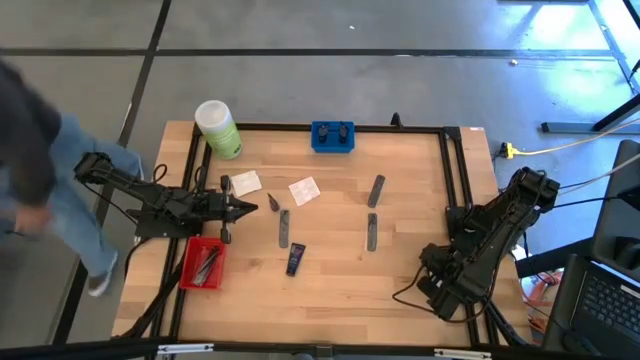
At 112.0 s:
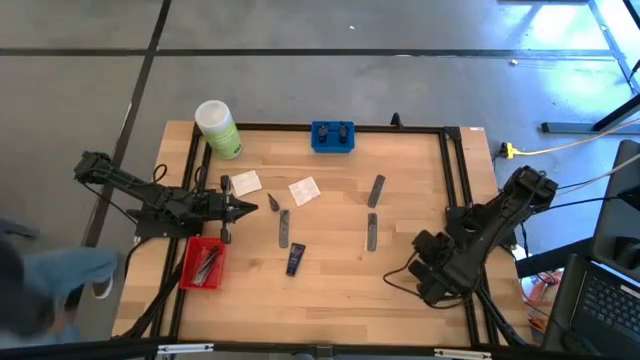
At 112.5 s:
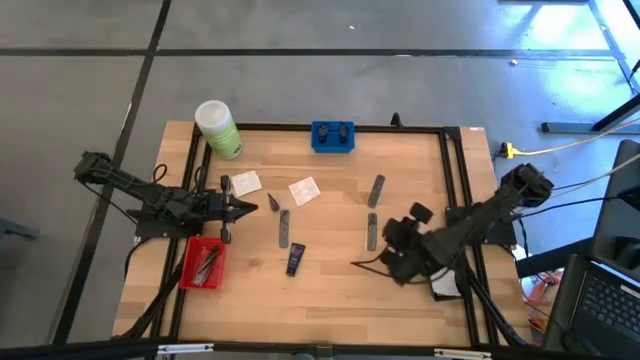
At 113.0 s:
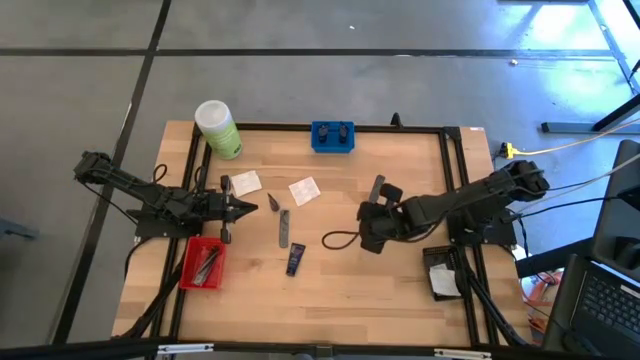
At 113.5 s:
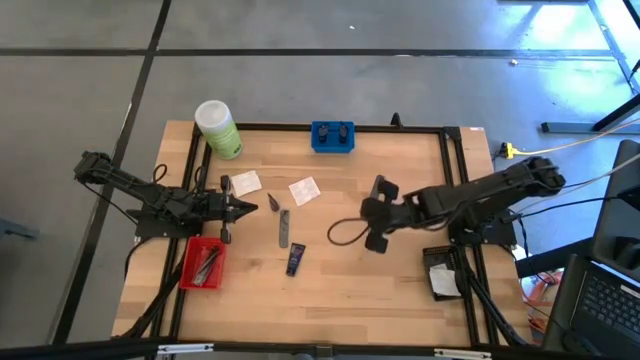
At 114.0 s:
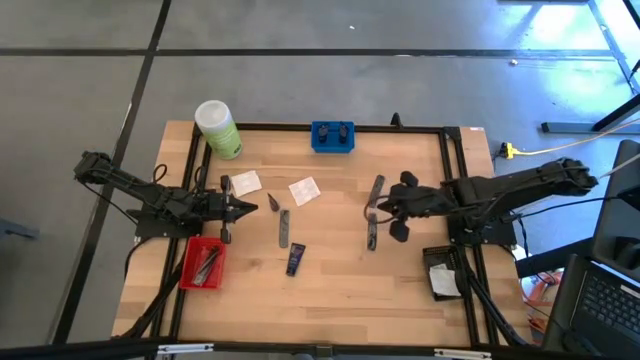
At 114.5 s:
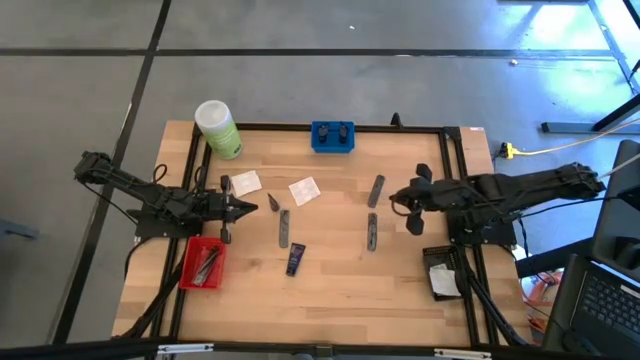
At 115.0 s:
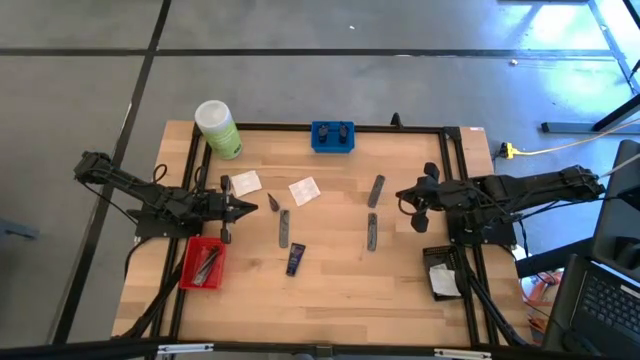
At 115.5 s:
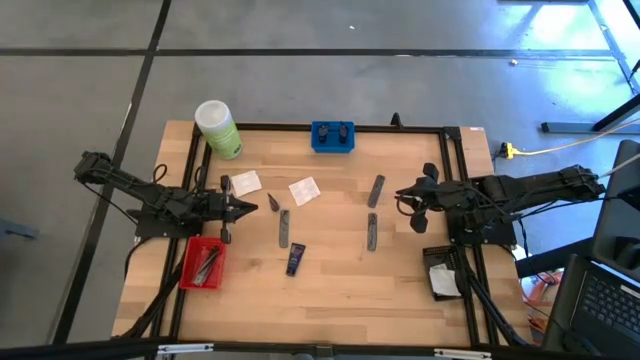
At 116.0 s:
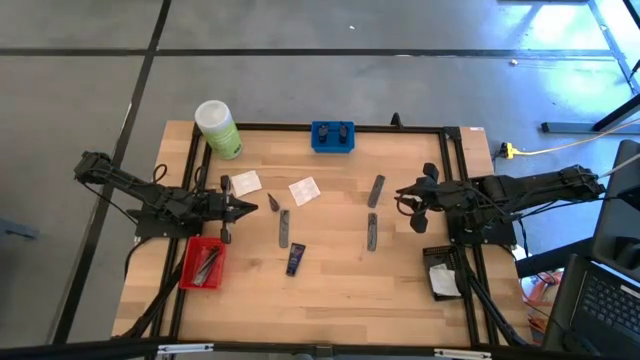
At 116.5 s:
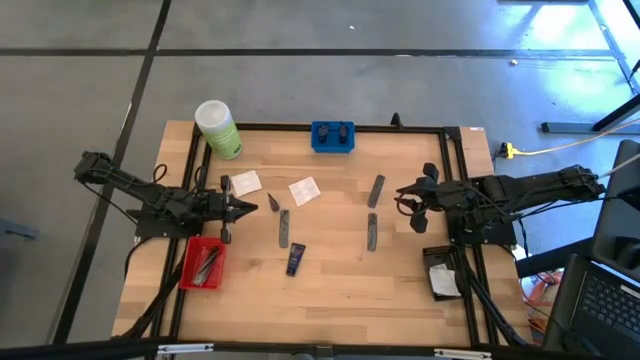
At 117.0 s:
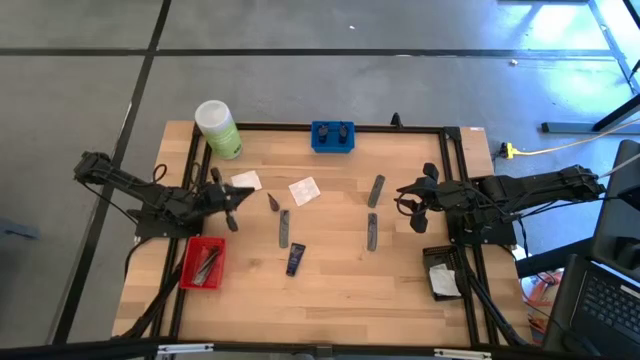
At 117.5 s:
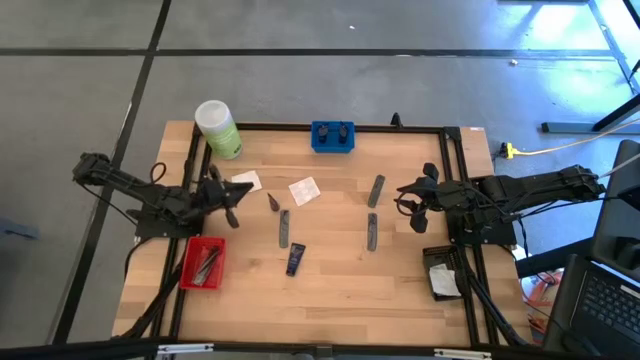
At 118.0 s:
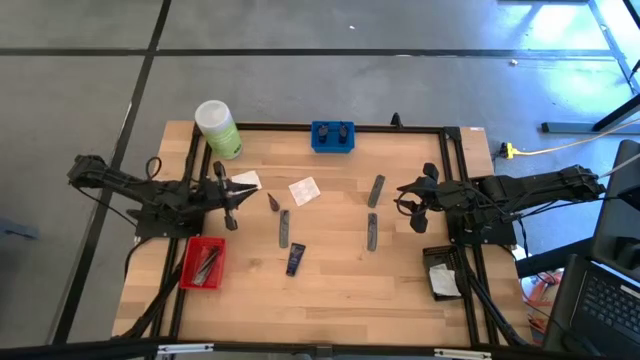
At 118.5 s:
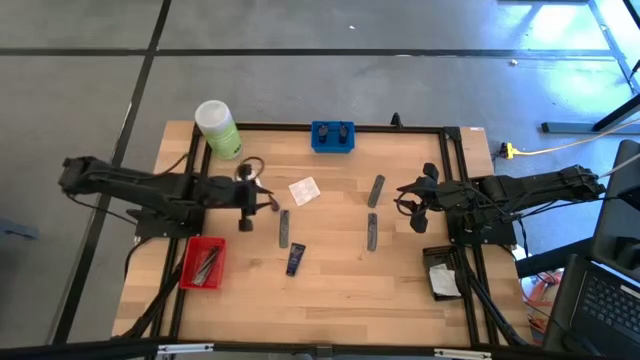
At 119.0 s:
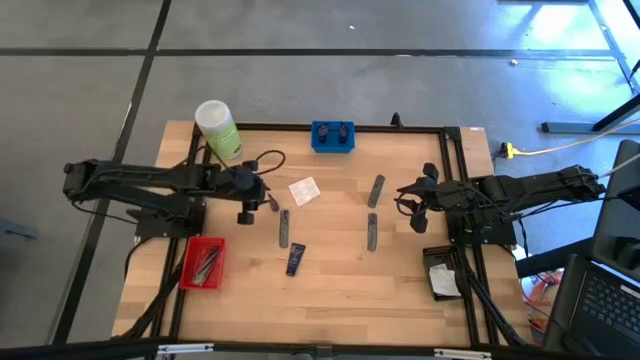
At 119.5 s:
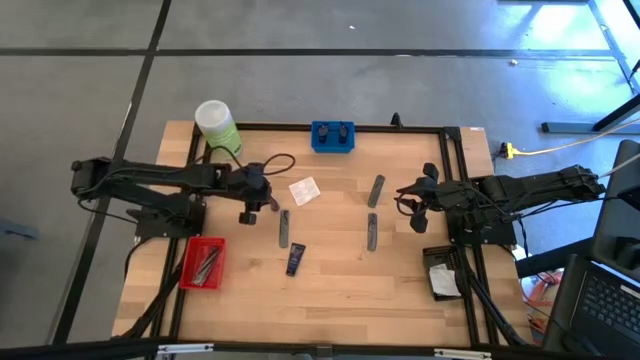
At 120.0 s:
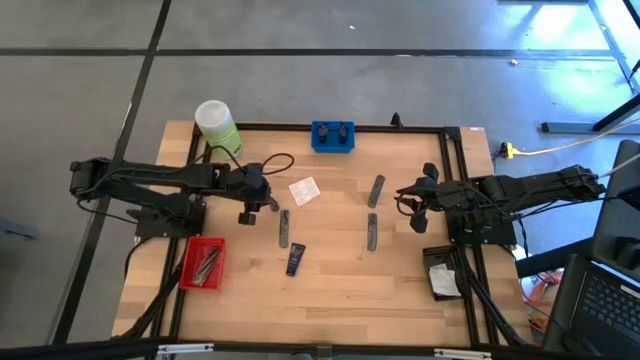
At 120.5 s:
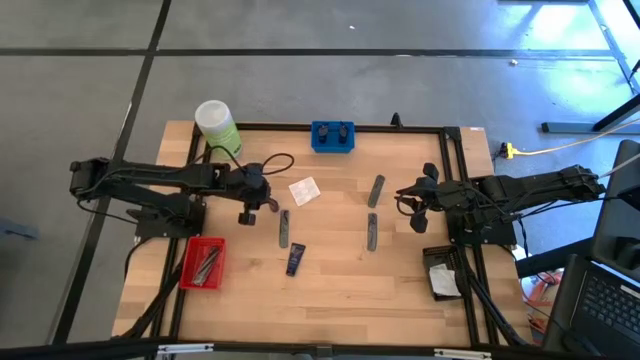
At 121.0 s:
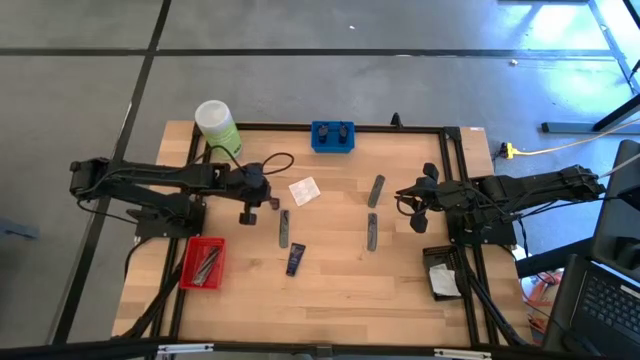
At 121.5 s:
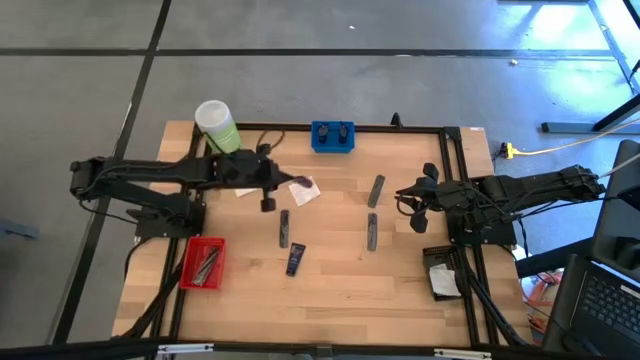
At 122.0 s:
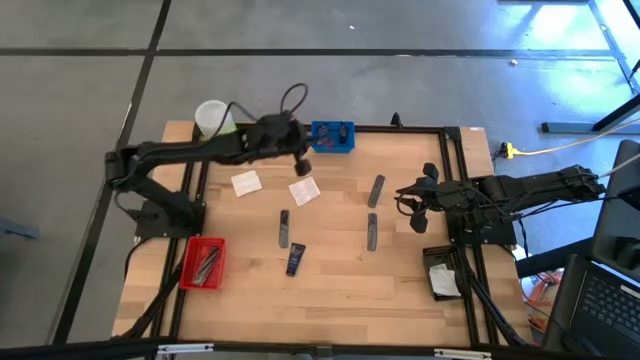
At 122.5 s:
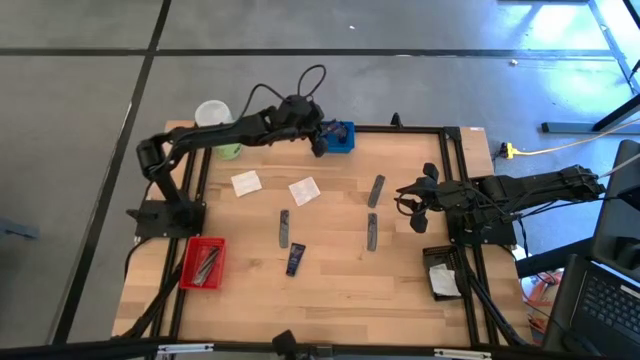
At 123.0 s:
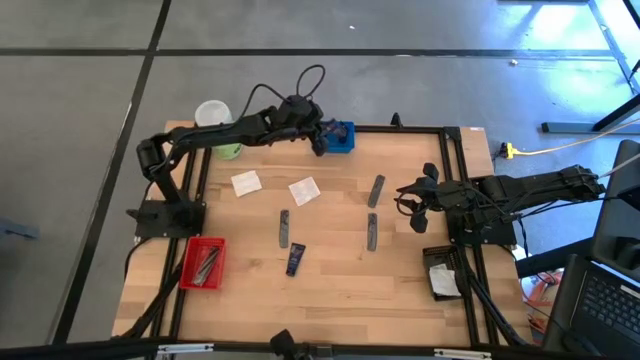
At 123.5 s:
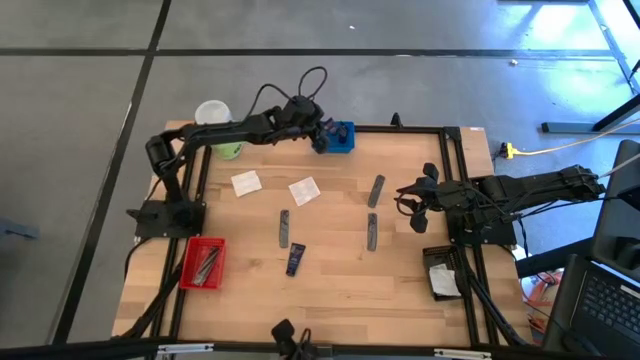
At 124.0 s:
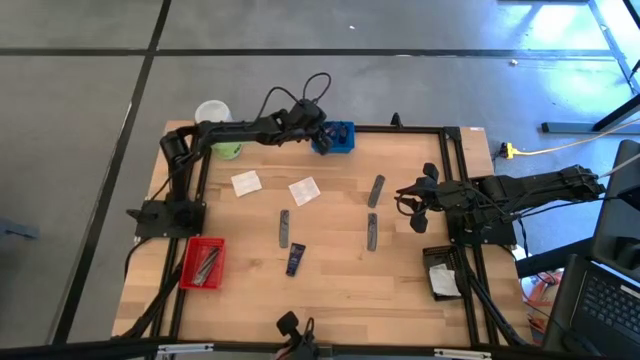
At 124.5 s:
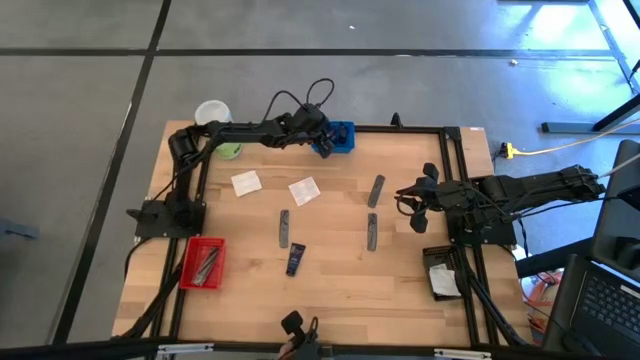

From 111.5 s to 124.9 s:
Task: Pick & Place Travel size toiletries
Put the blue shaving cream bottle into the blue basket
